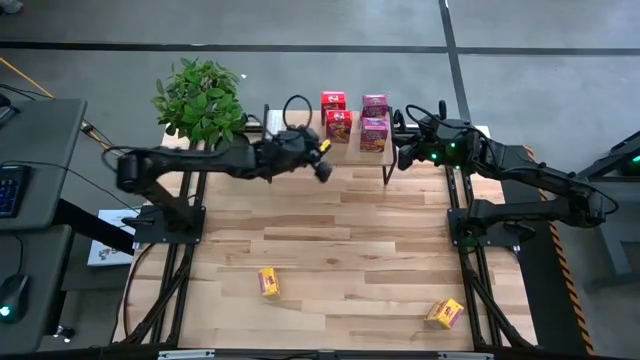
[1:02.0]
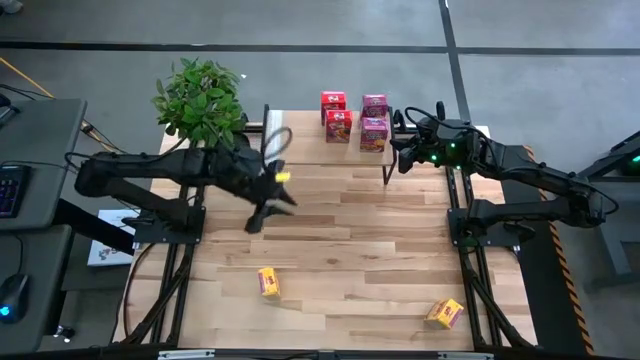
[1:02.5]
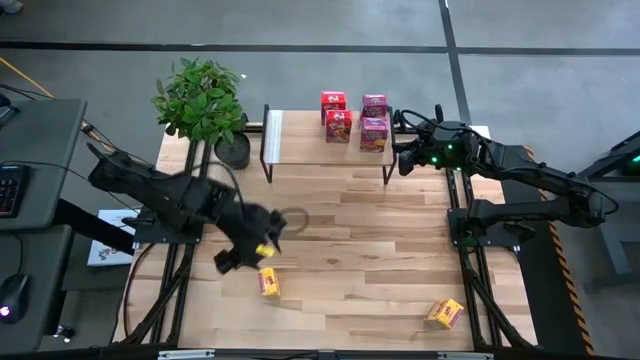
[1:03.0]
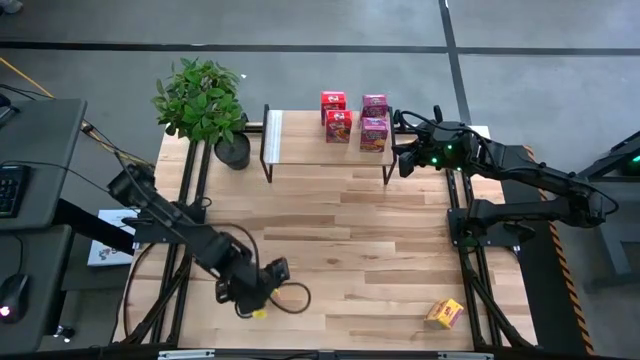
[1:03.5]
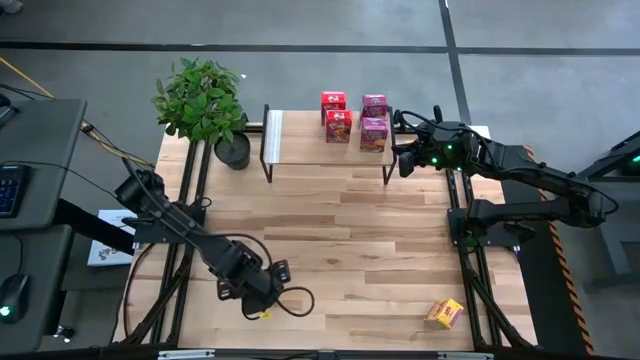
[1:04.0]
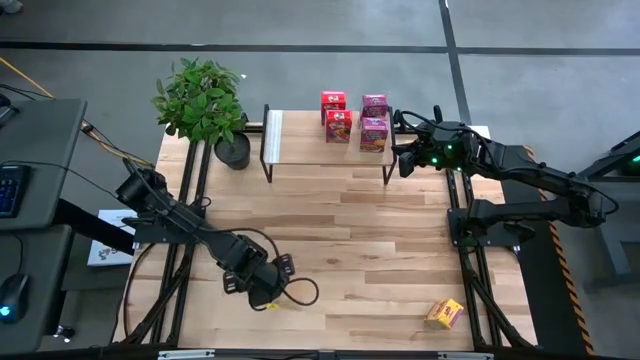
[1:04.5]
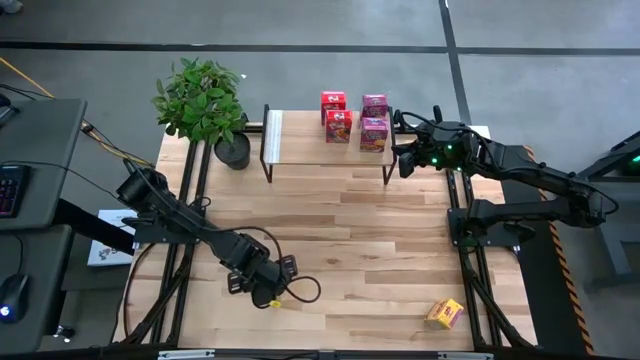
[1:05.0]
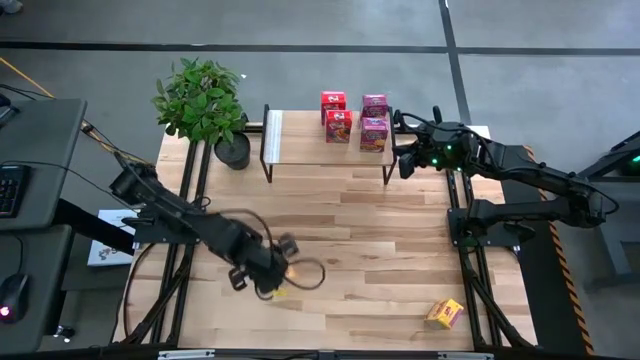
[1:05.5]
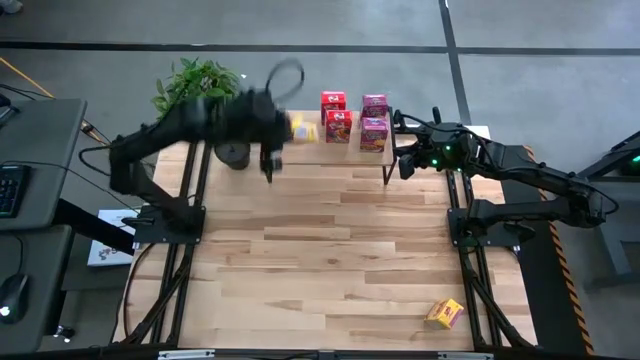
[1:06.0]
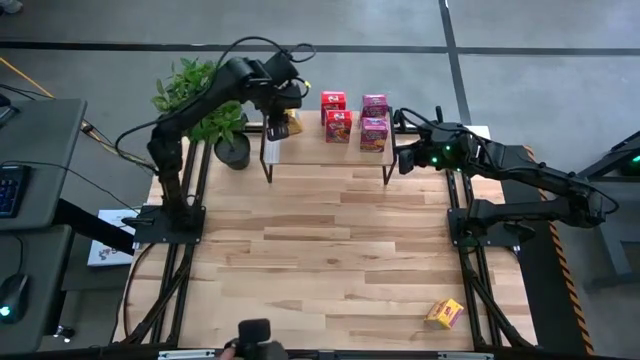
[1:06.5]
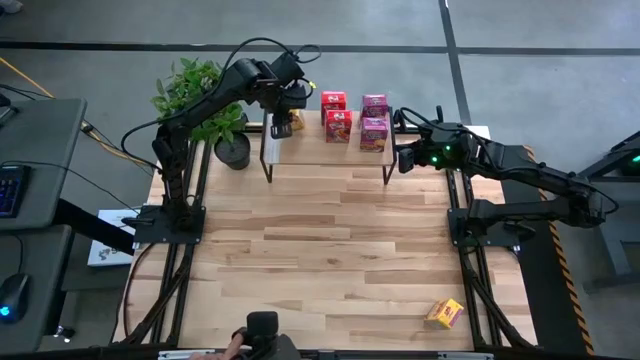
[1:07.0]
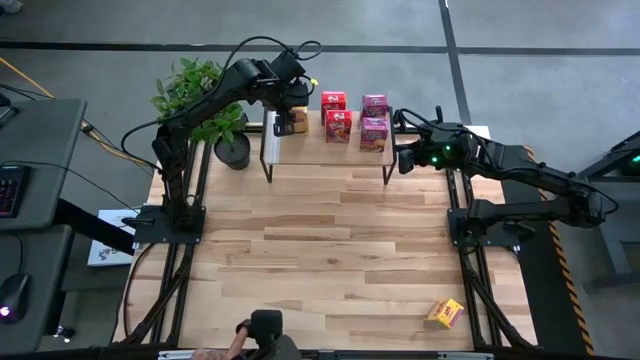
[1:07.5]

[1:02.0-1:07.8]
Task: Stack cereal on shelf
Put the left yellow cereal box on the shelf

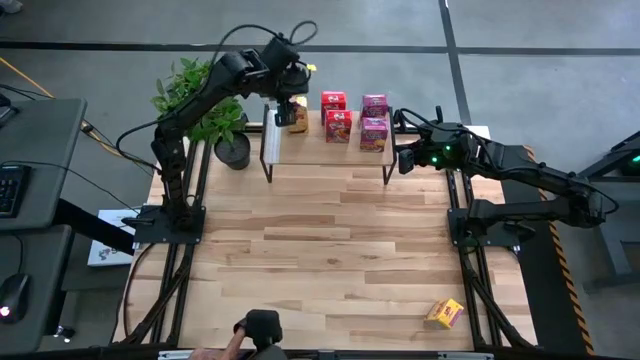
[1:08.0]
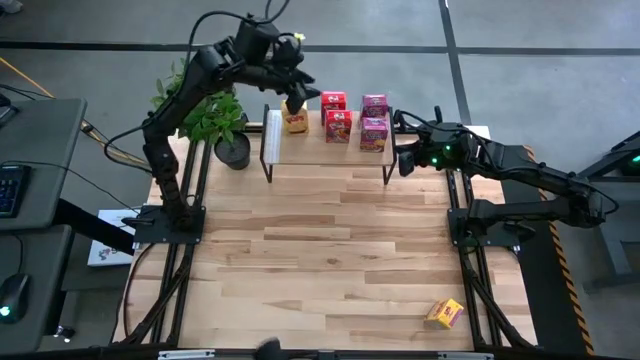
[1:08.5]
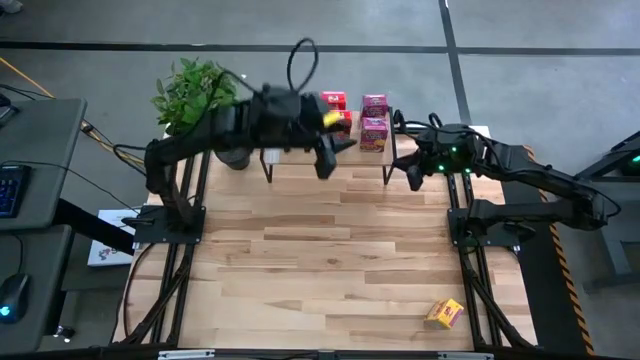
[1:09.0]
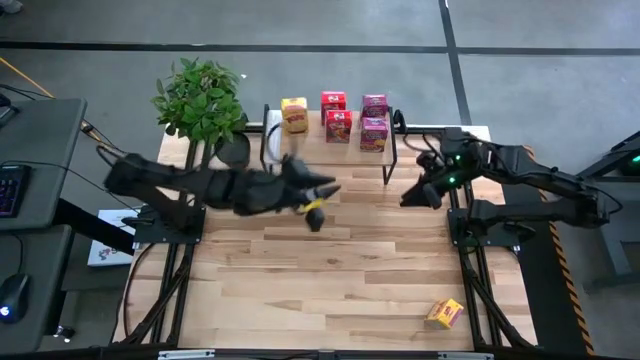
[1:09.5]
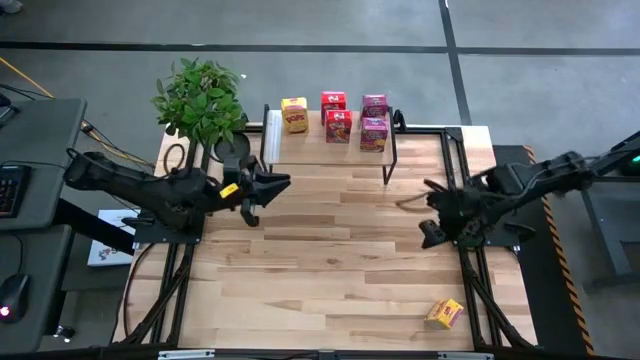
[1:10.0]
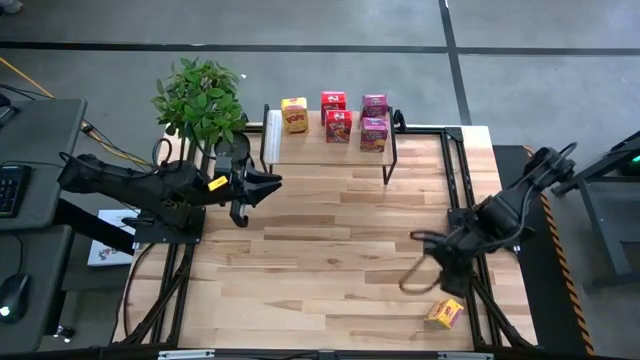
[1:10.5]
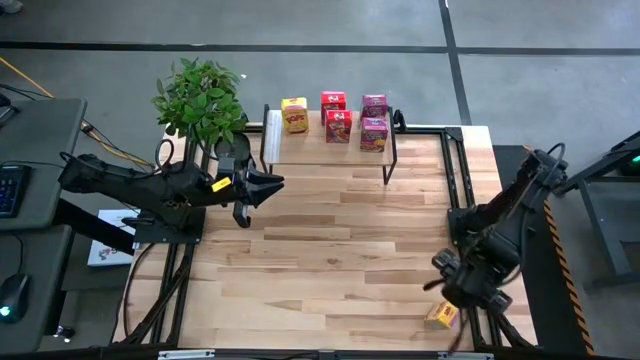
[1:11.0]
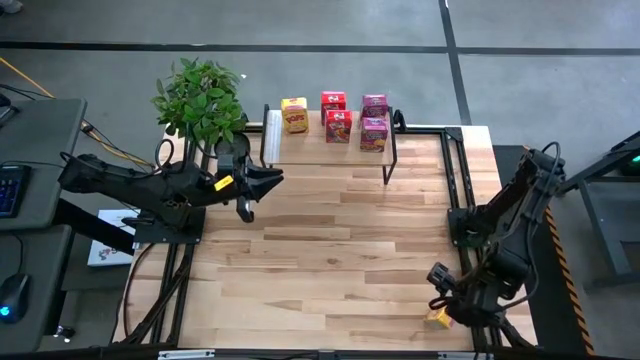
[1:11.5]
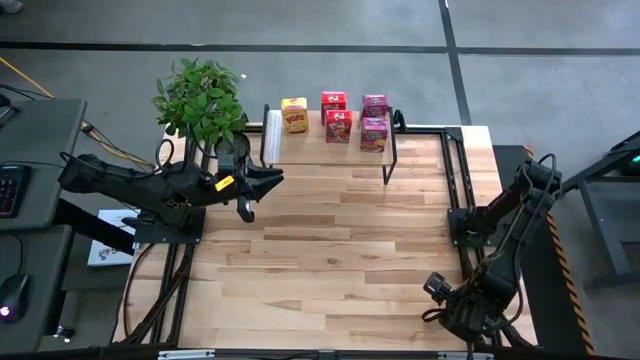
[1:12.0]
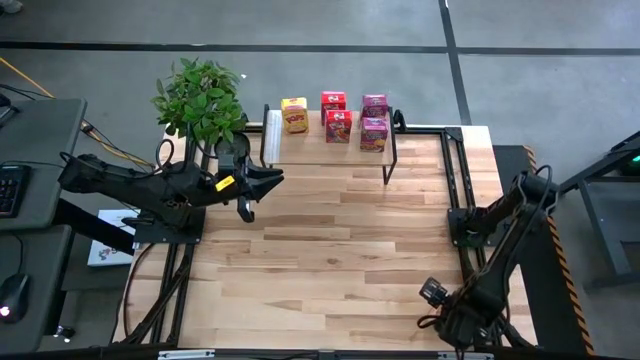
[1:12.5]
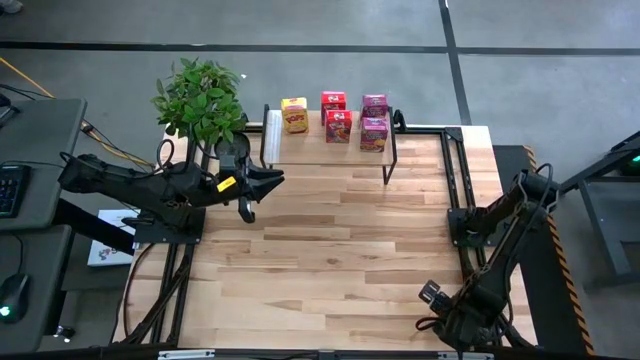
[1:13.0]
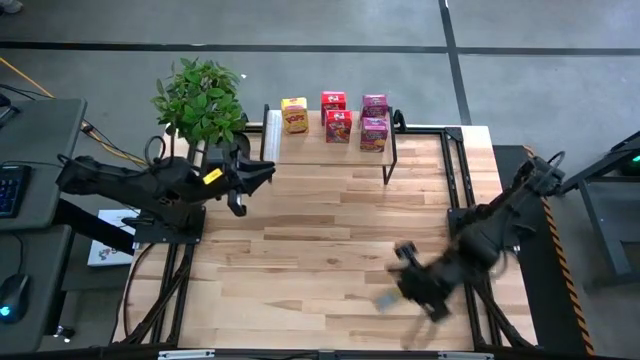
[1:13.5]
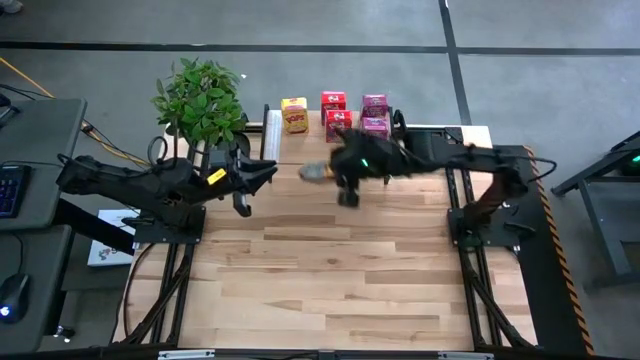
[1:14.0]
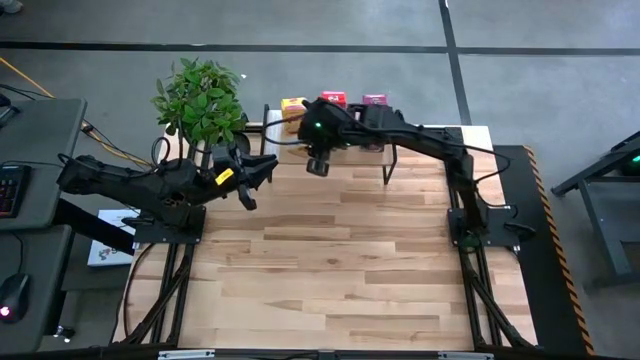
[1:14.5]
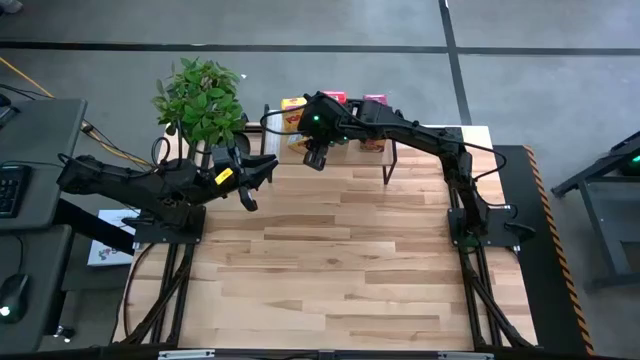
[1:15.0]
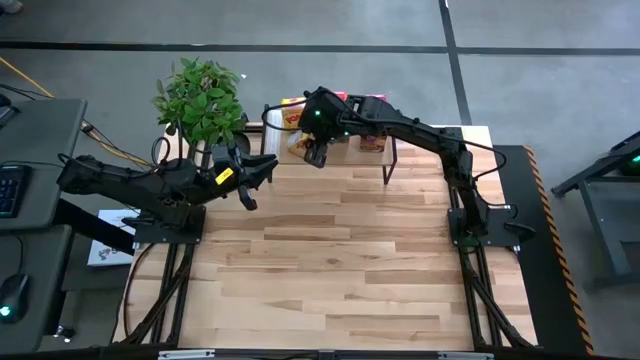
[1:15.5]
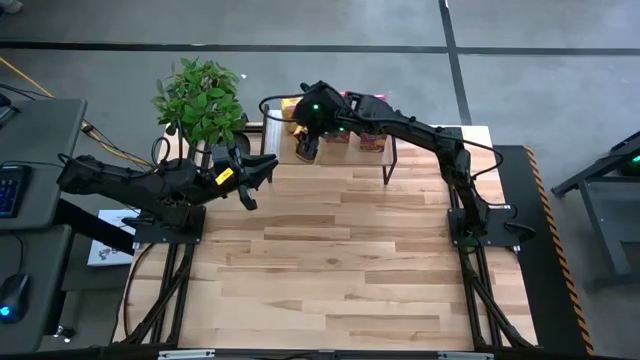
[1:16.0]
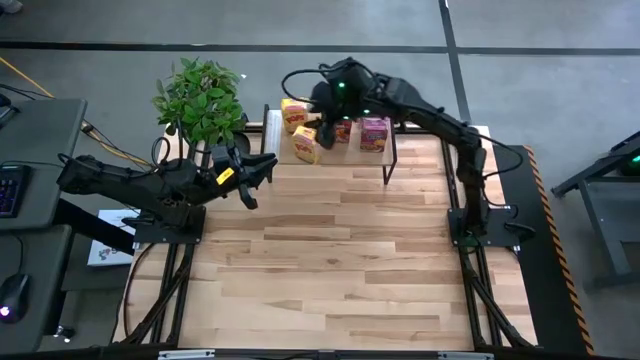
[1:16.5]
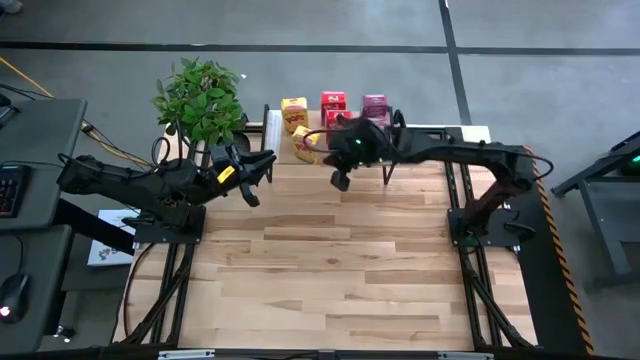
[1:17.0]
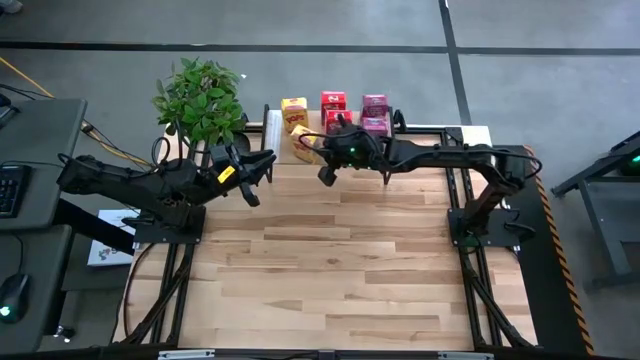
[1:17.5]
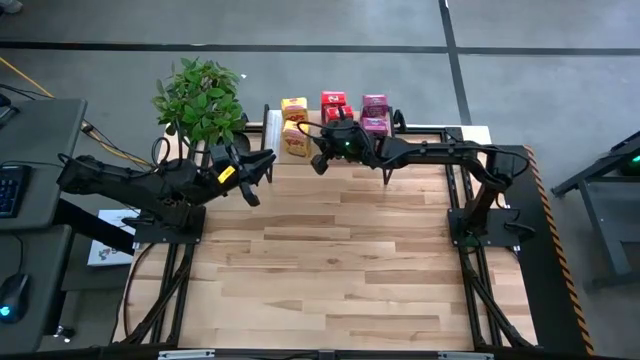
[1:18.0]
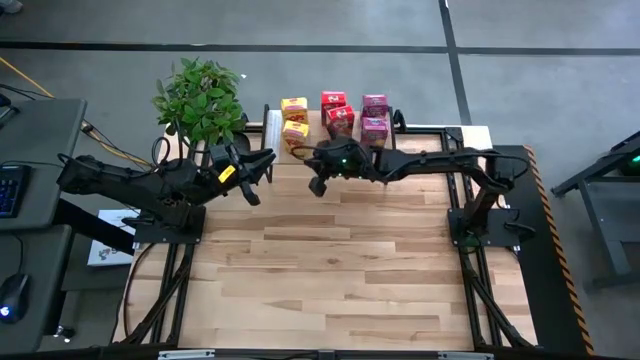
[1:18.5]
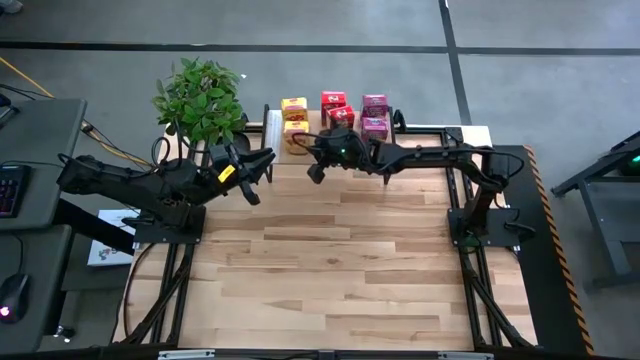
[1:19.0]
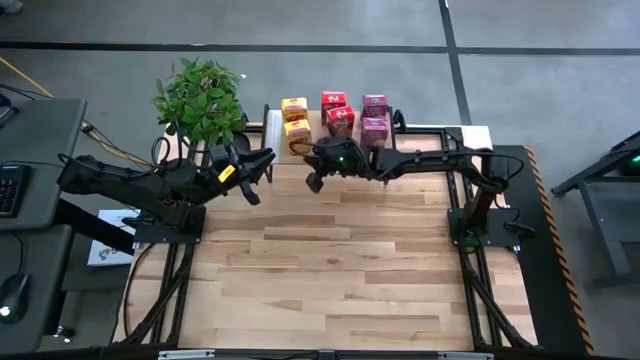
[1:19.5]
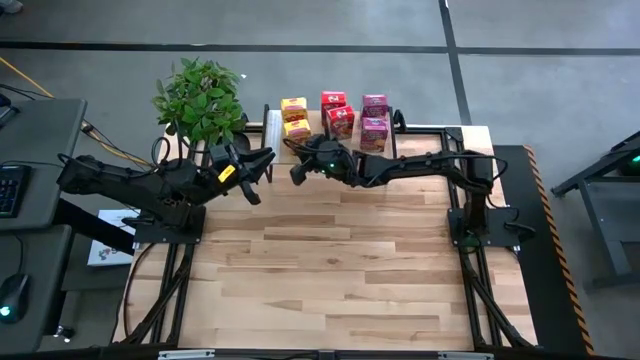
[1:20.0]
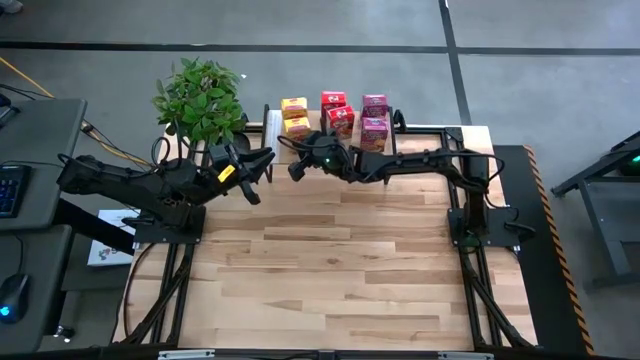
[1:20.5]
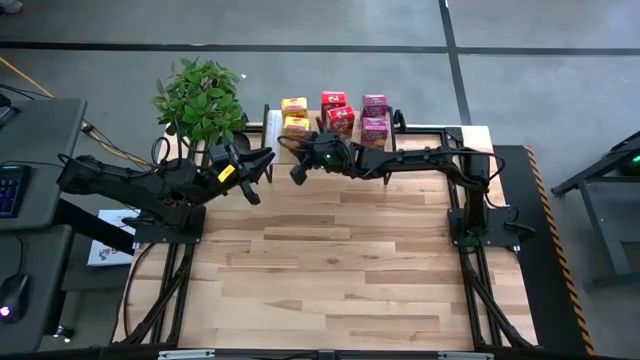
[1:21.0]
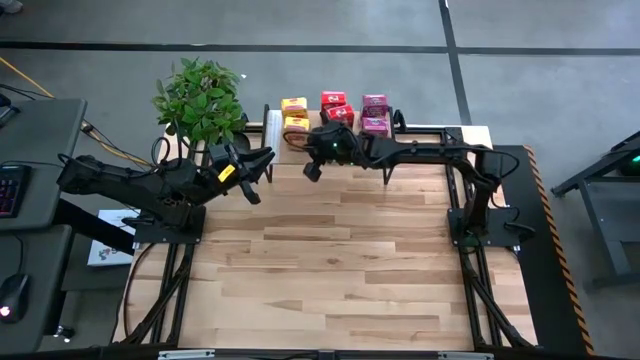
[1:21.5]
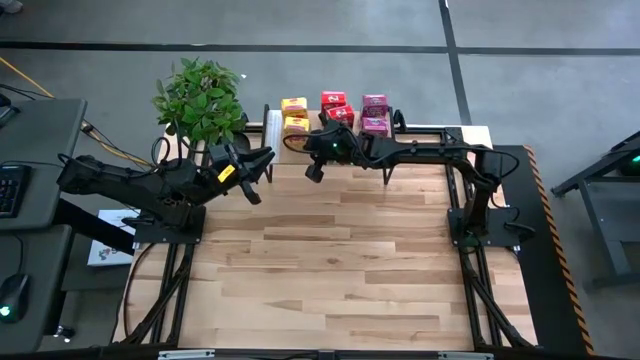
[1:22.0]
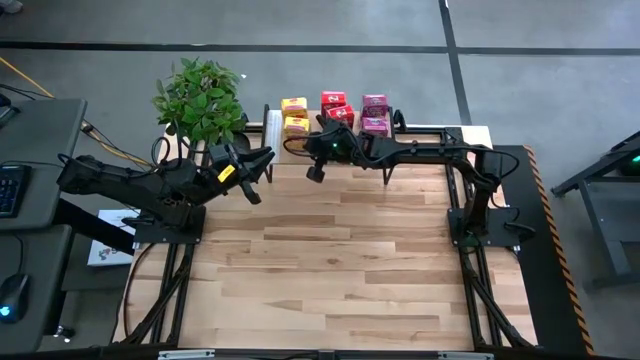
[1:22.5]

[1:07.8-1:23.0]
Put the yellow cereal box on the shelf

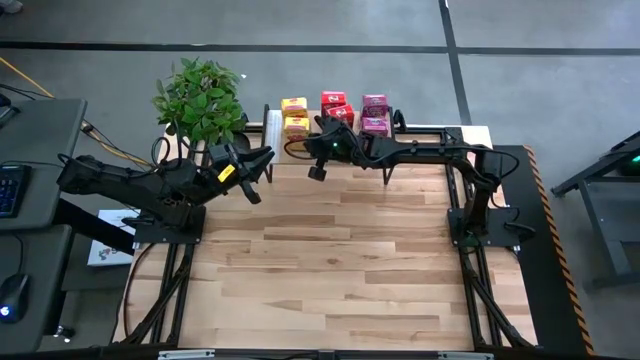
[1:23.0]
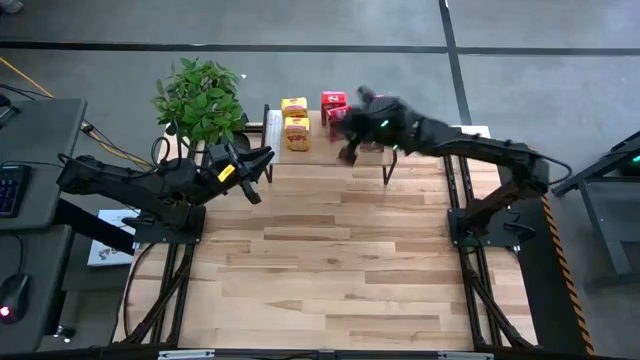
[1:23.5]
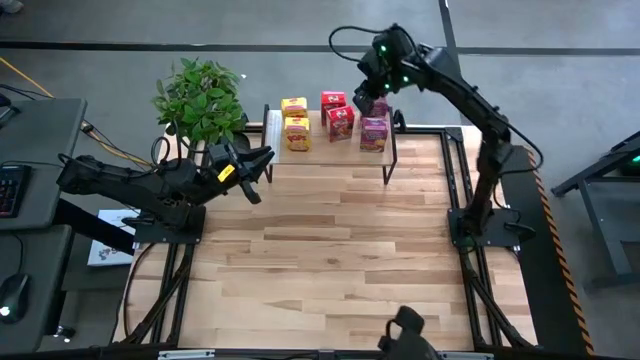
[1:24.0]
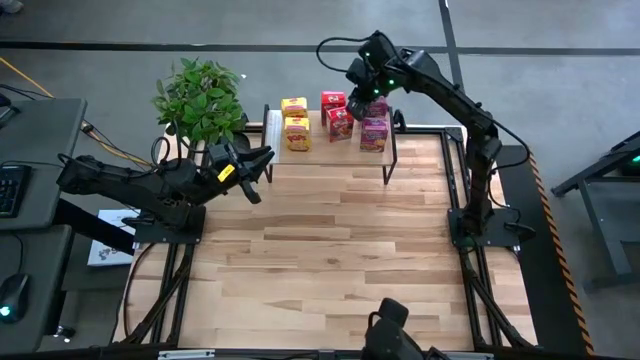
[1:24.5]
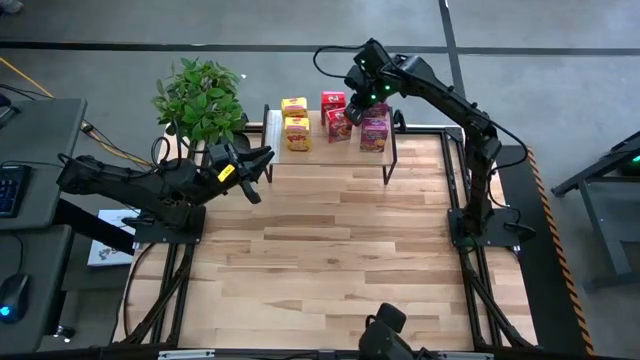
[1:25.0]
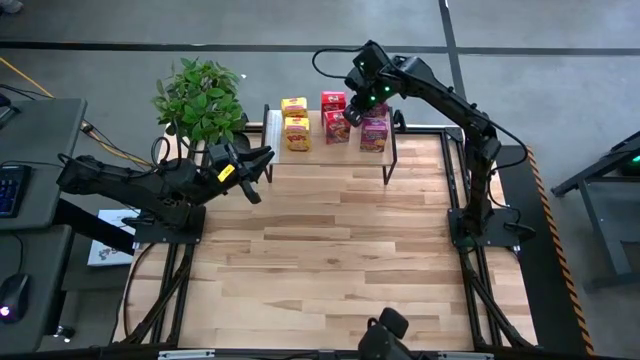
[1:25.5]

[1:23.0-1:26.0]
Adjust the red cereal box
